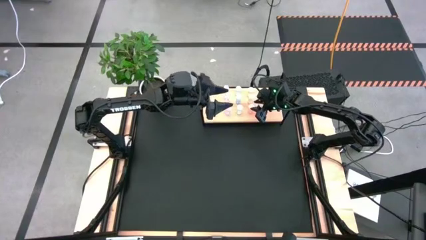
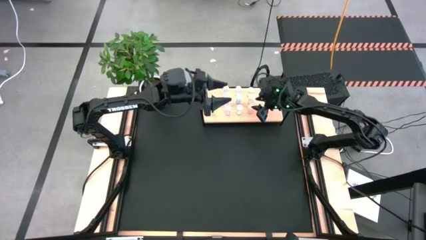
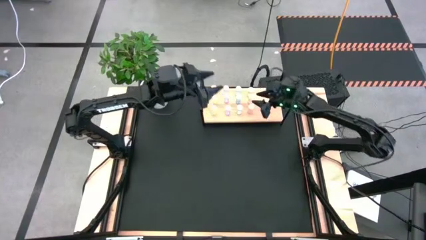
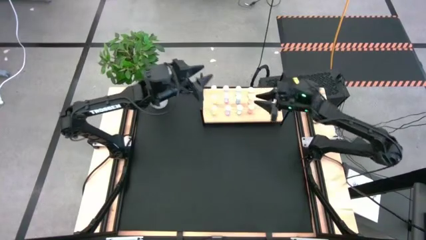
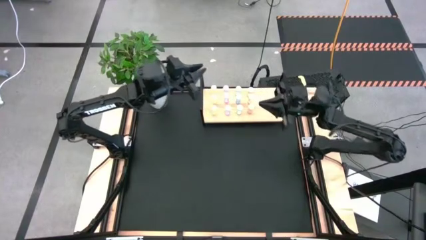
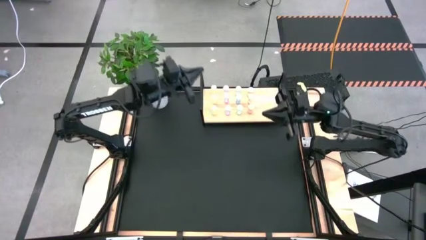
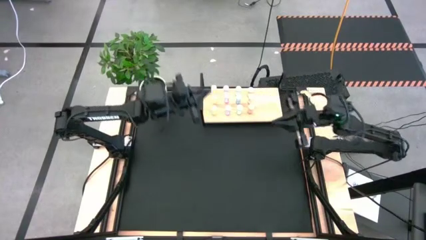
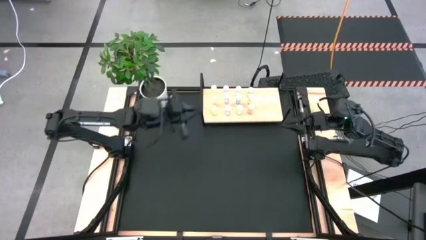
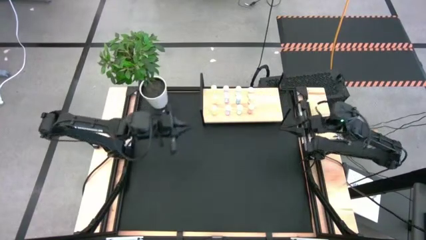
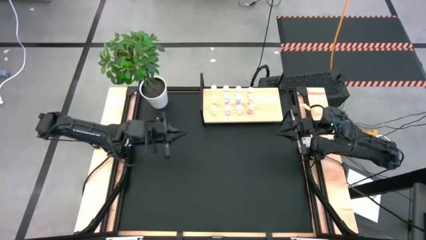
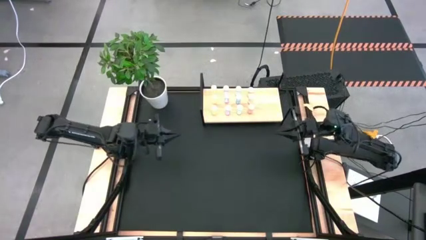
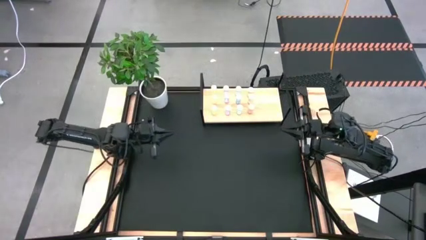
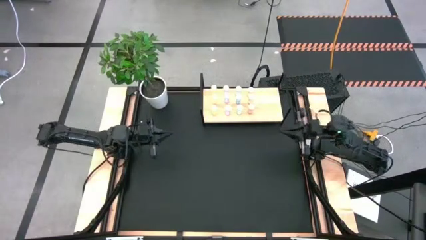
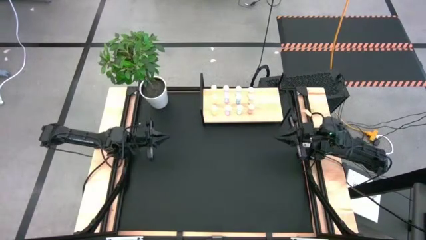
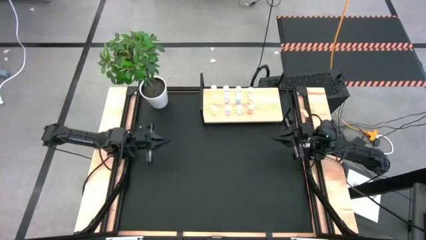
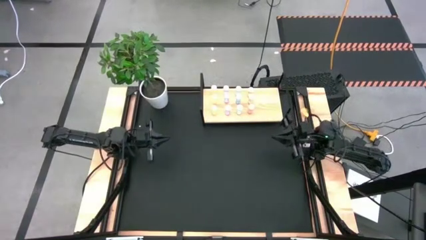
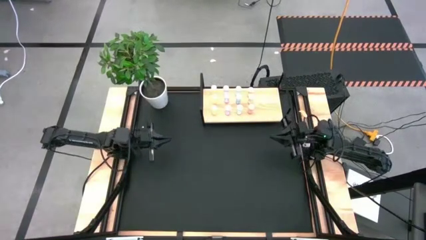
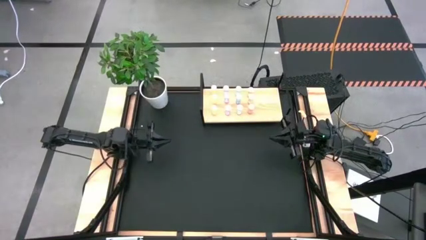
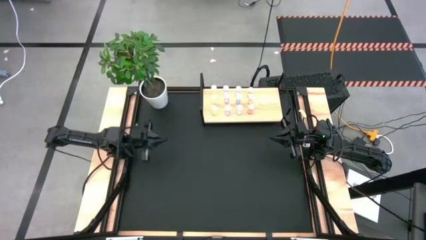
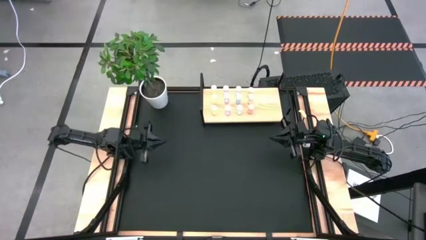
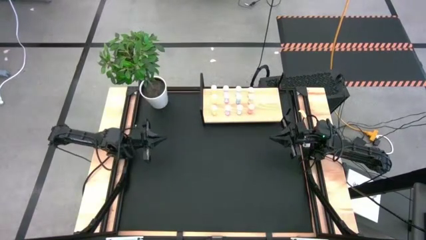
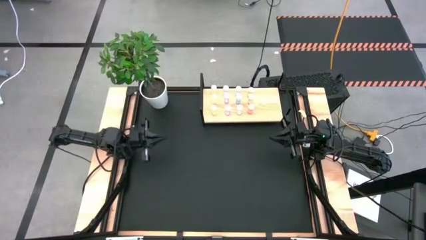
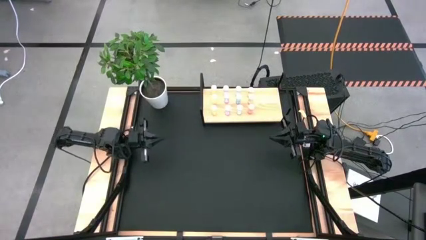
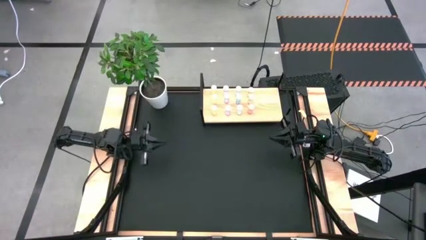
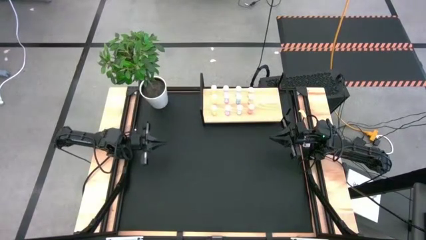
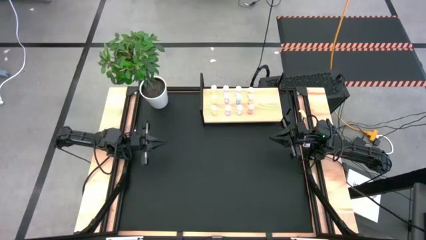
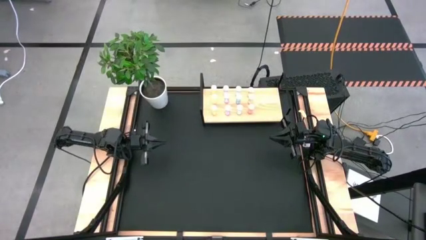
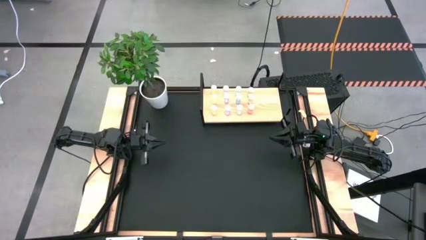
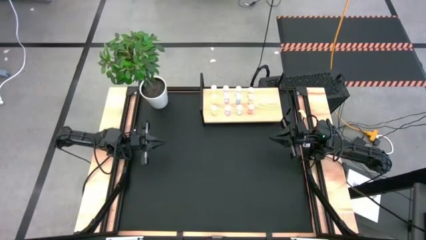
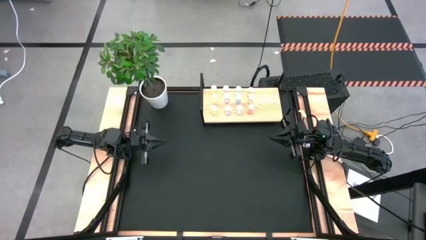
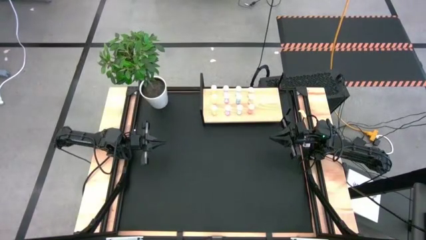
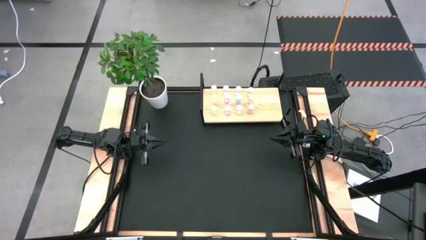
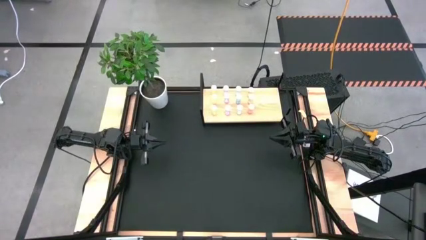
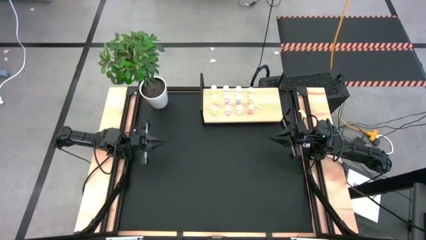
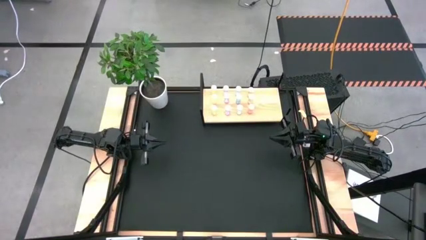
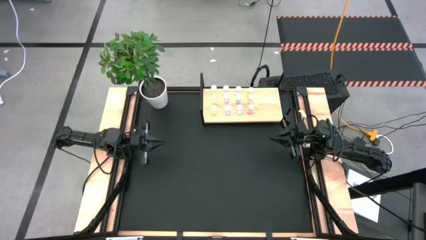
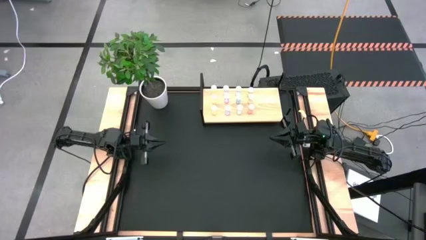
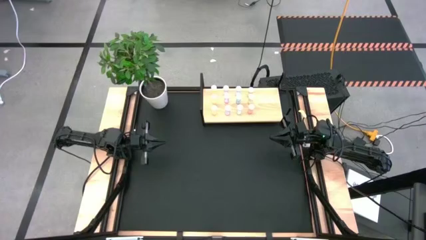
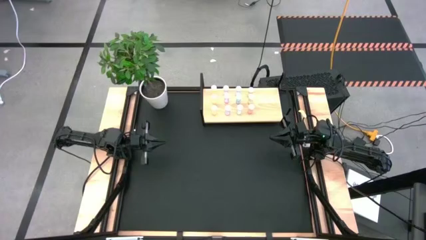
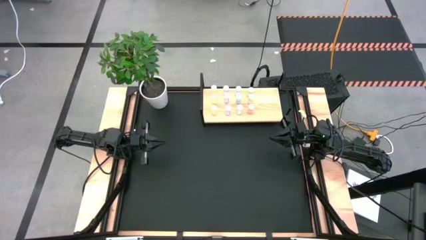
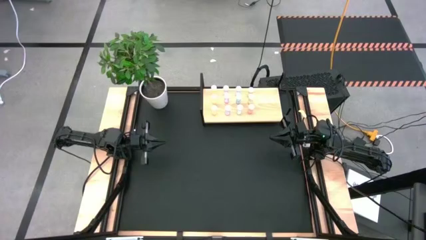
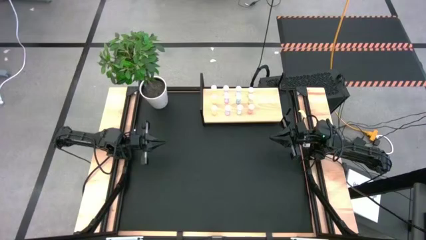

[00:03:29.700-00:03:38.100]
Task: Pick and place medicine bottles onto shelf by color
Return to Home Position

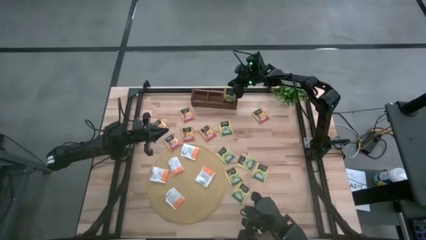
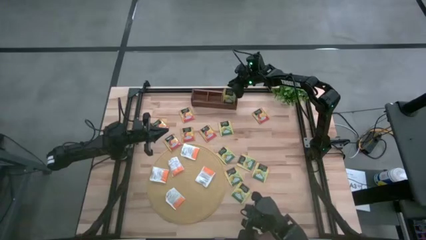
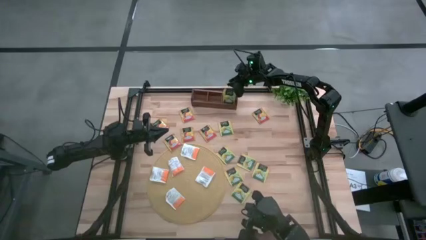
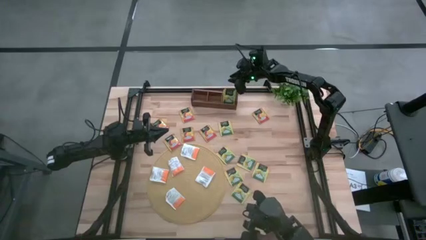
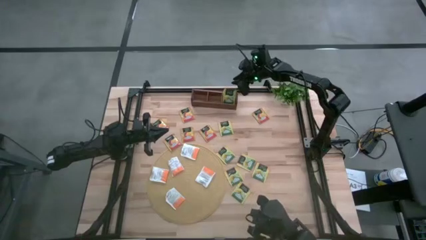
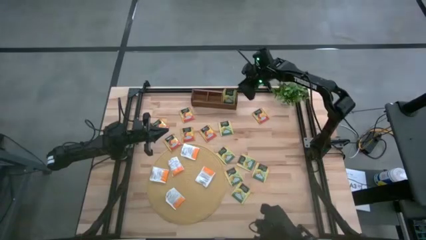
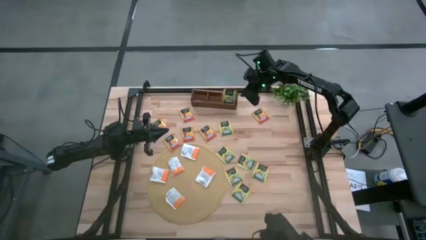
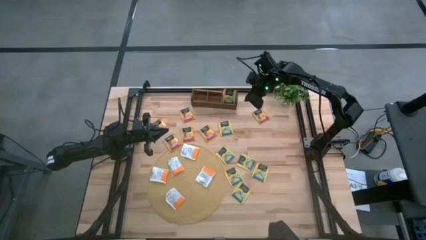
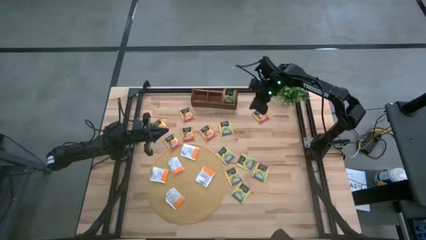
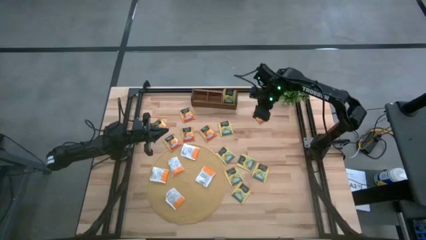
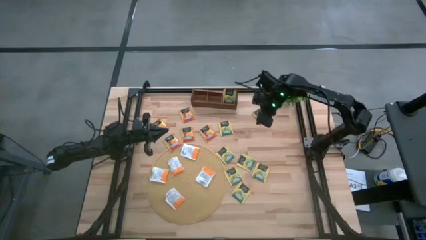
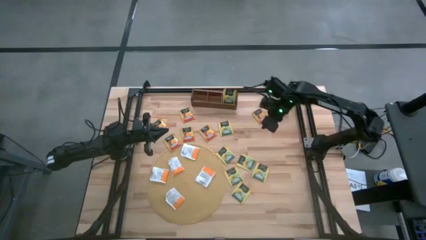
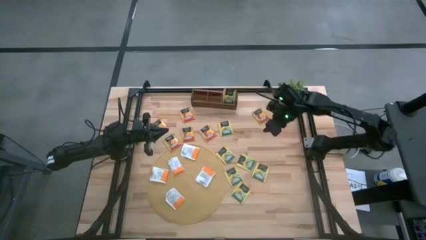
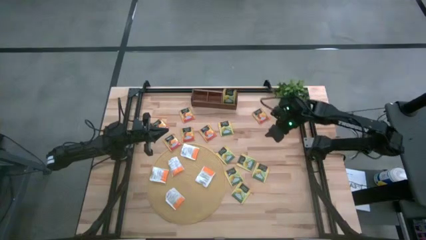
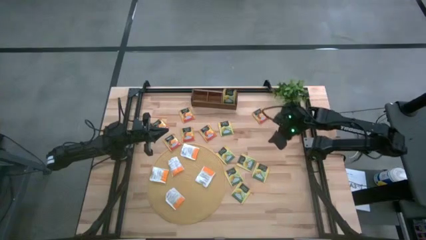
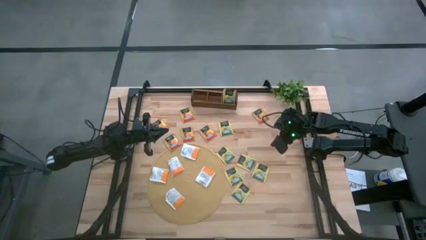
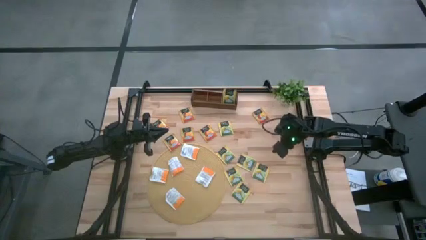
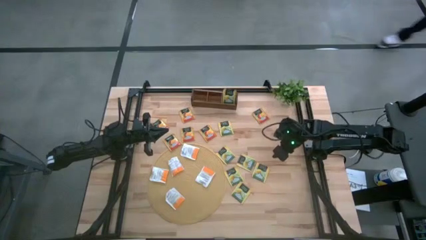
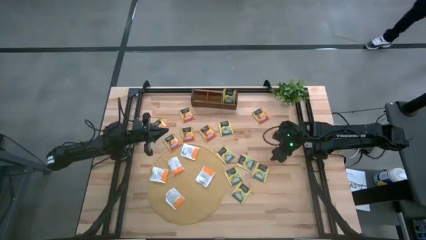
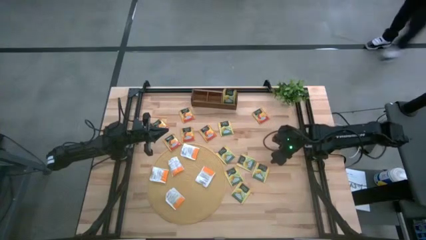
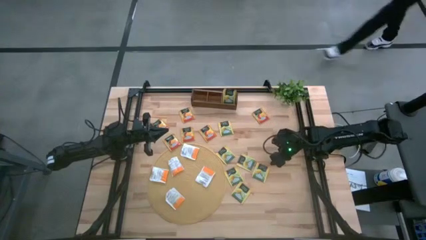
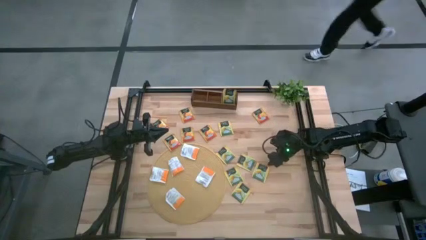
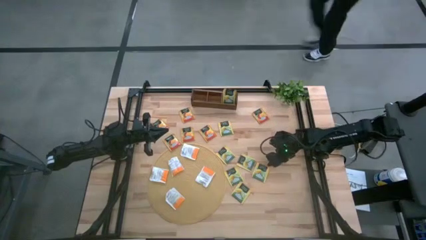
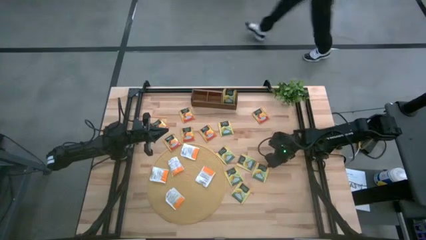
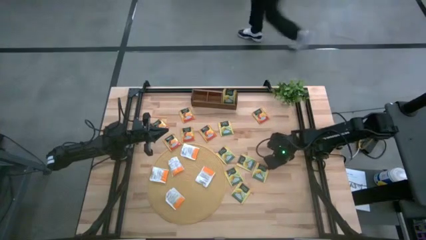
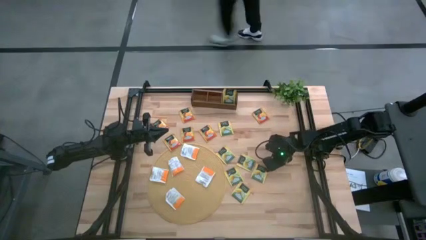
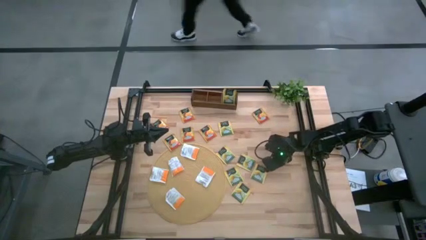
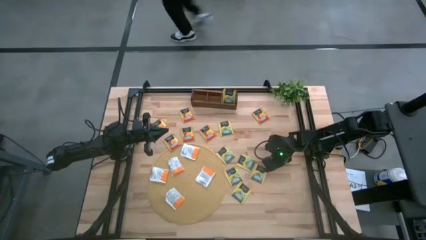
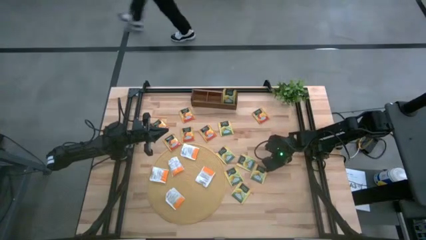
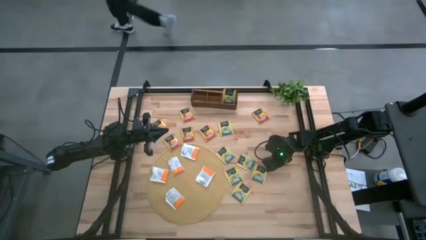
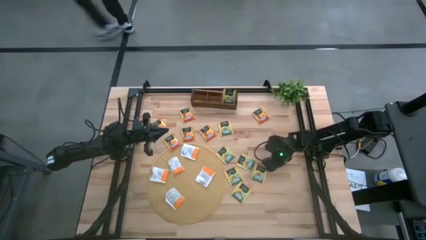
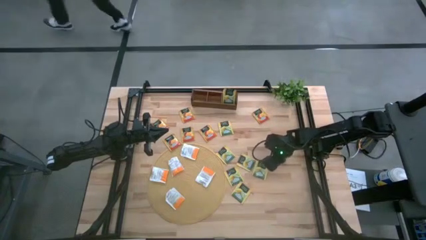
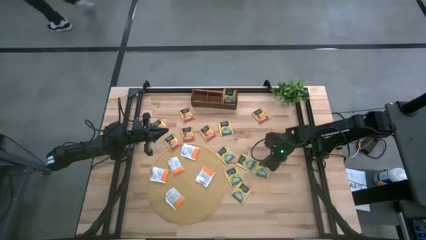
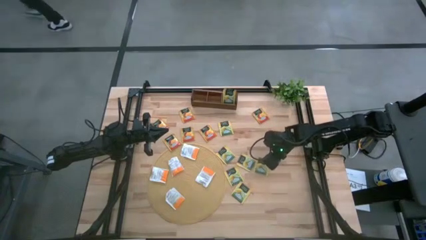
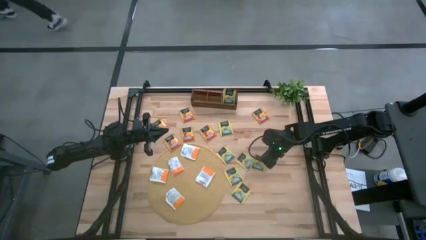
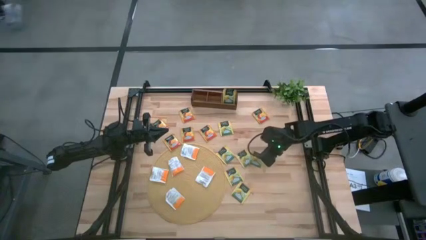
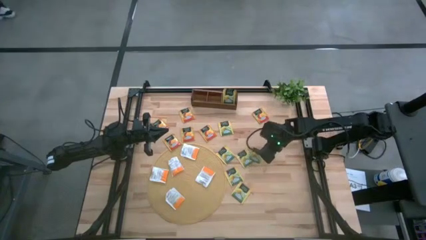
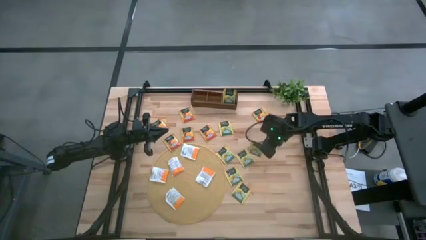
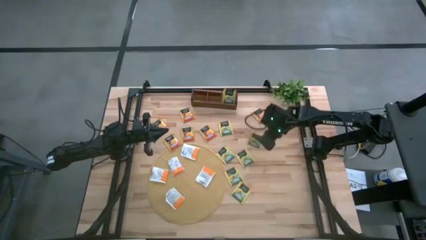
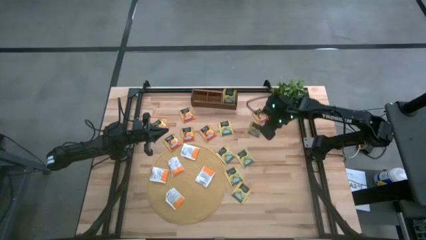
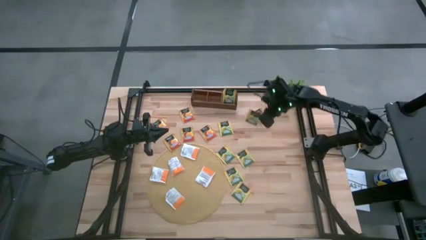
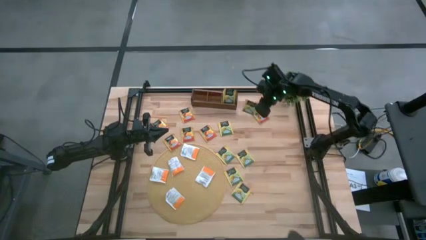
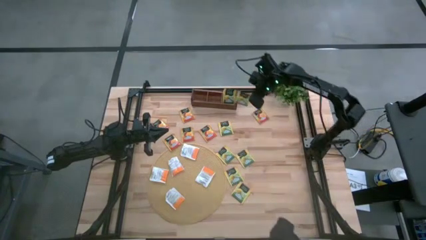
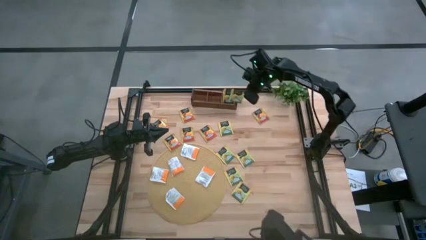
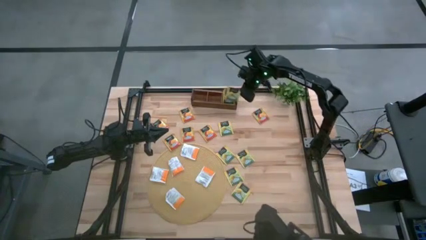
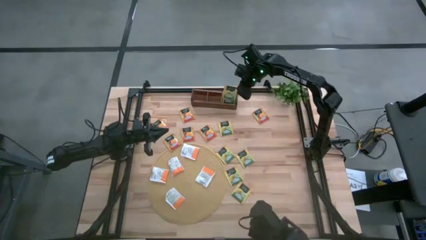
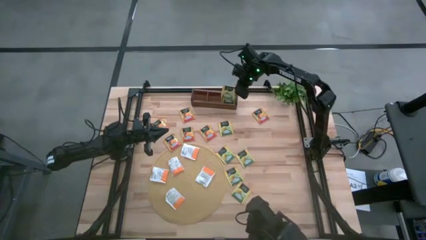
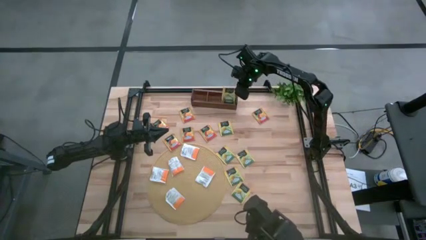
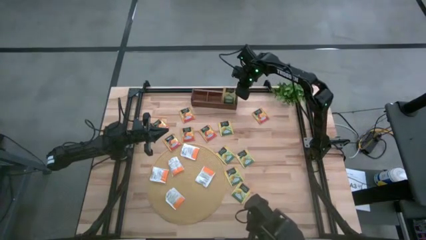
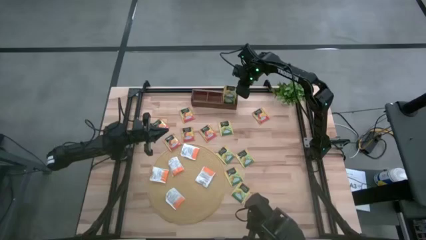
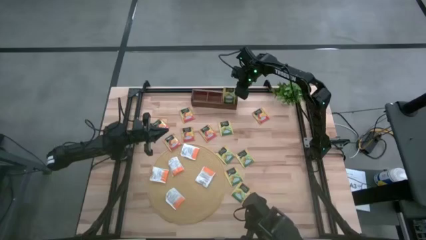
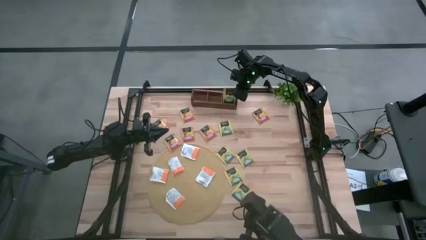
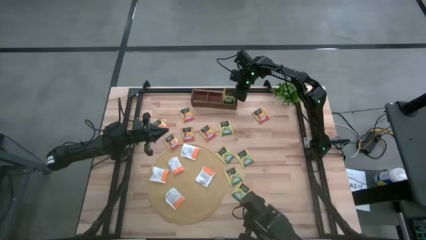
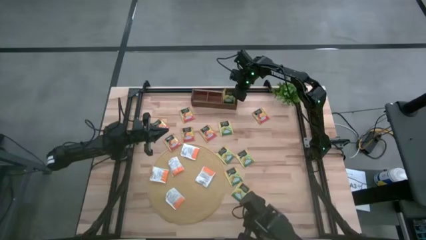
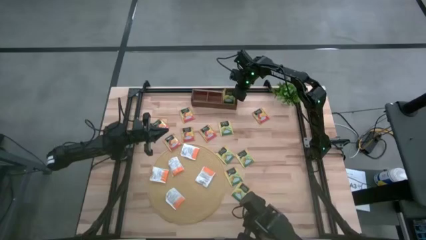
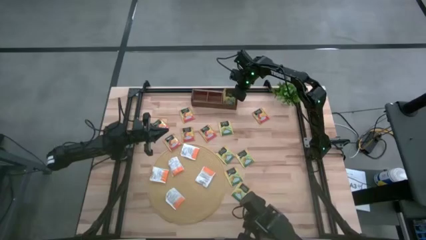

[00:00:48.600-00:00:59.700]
Task: Pick & Place Tea
Put the green tea bags into the right slot of the wooden organizer
